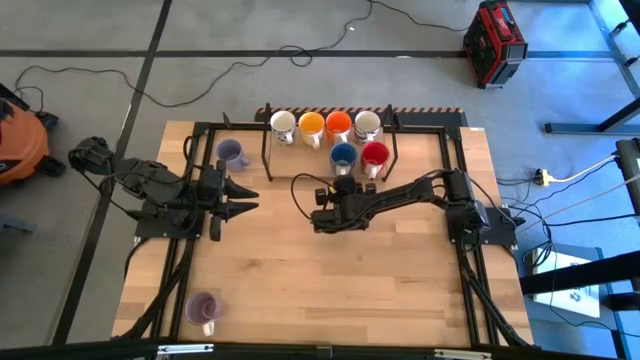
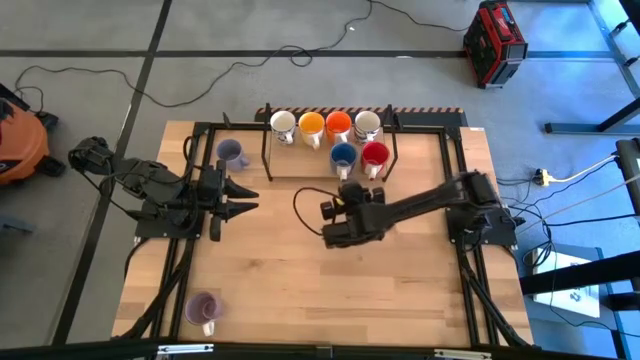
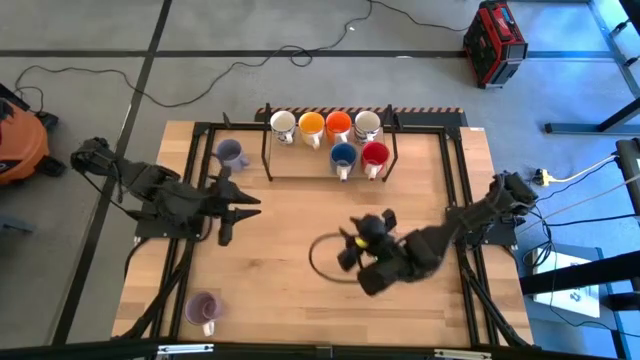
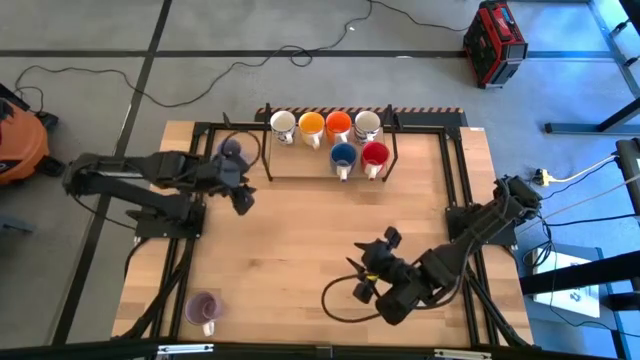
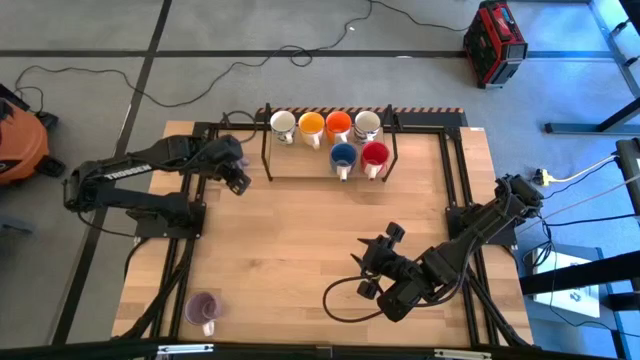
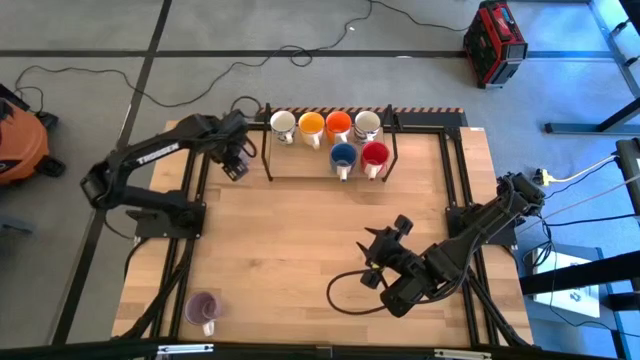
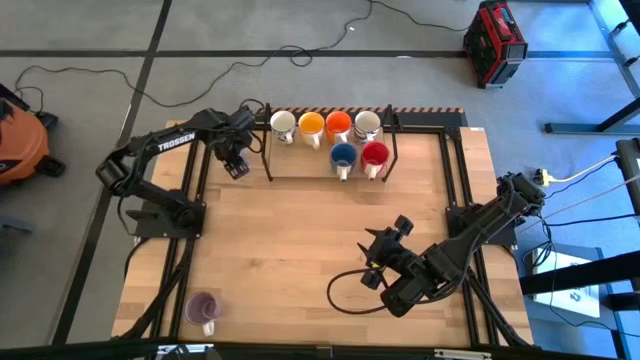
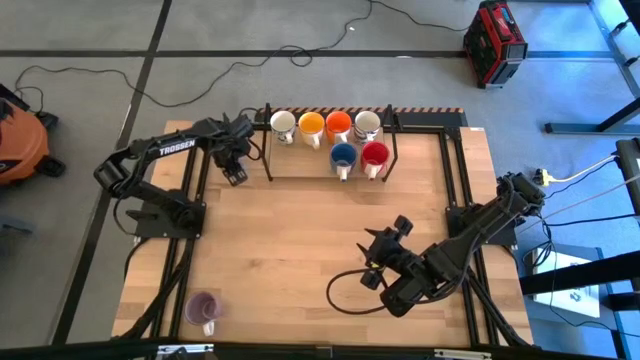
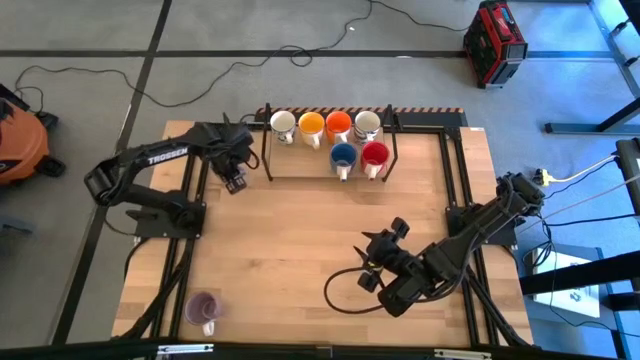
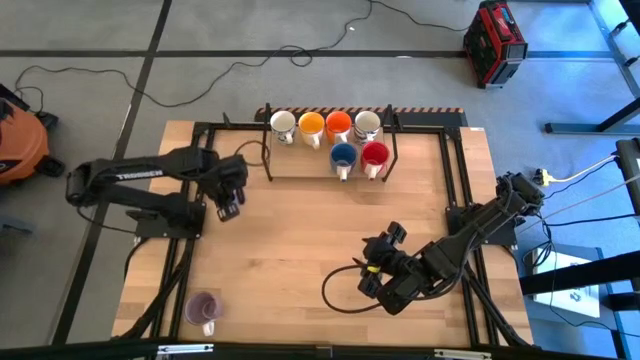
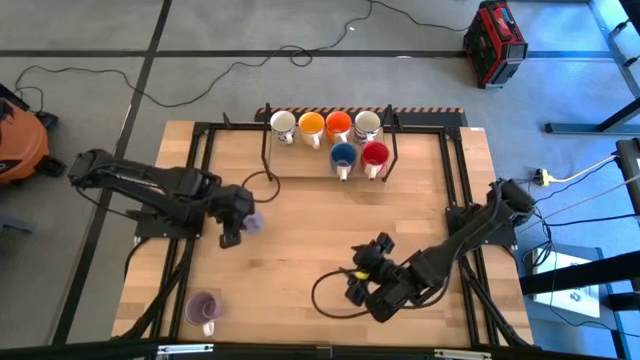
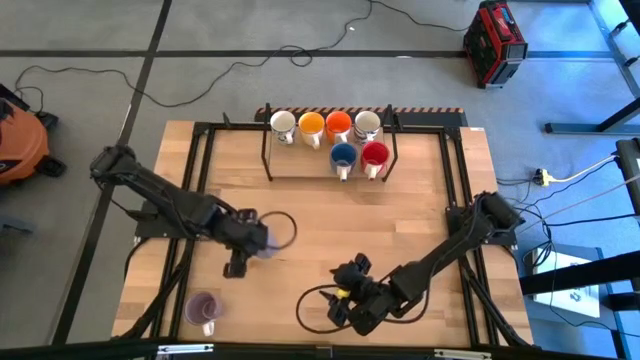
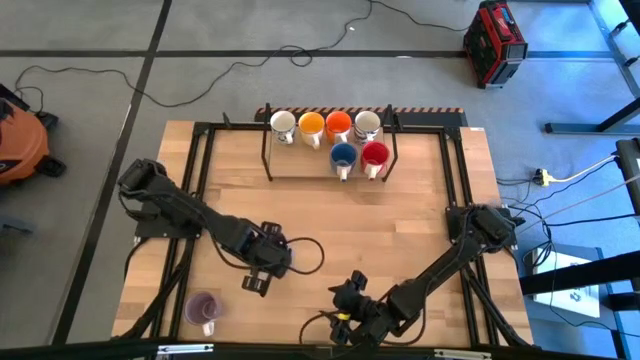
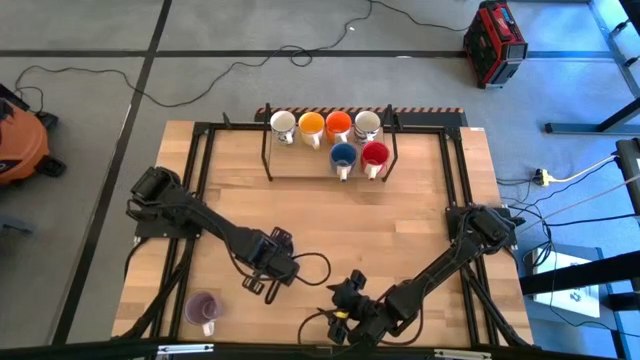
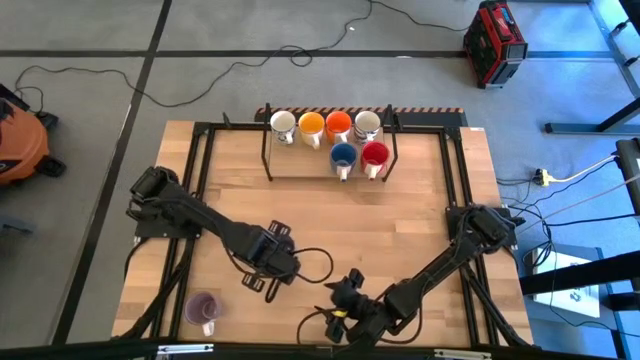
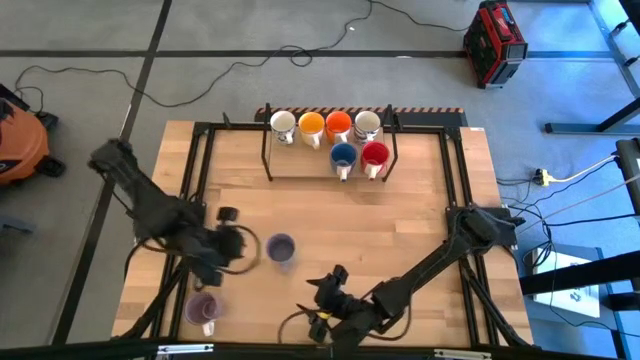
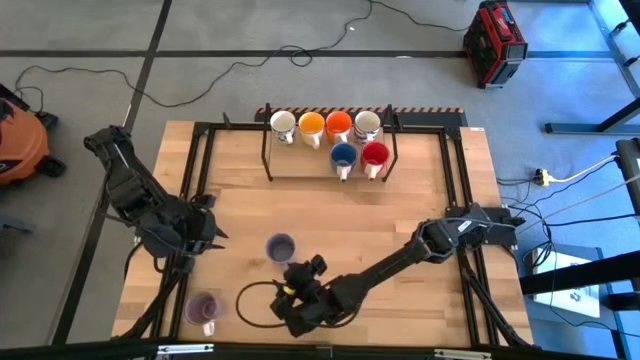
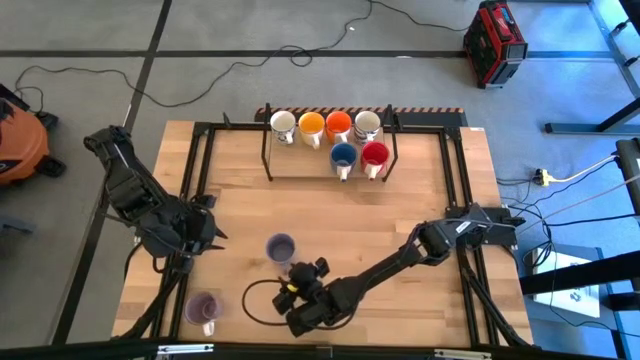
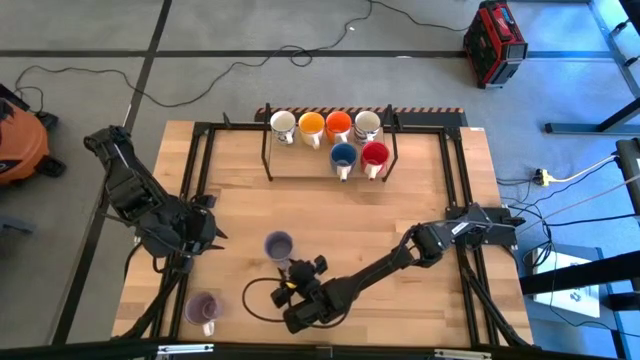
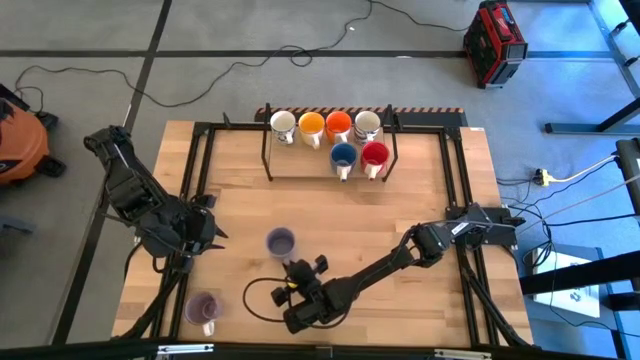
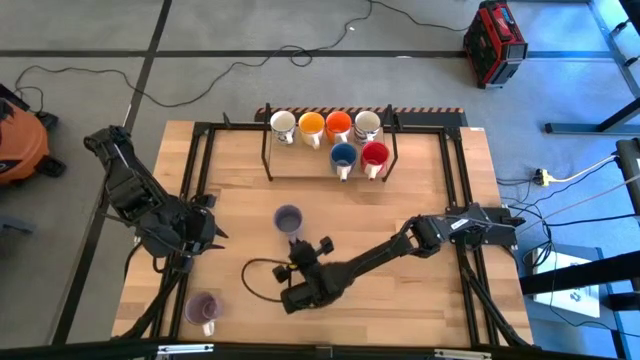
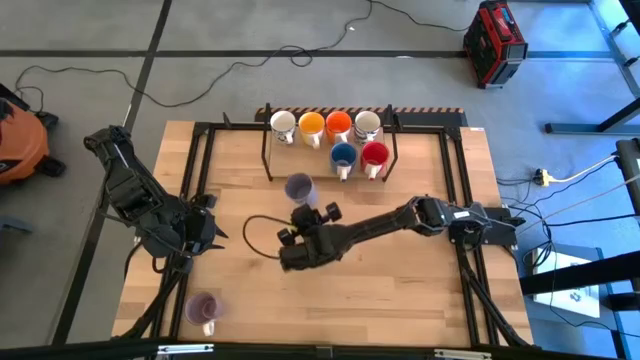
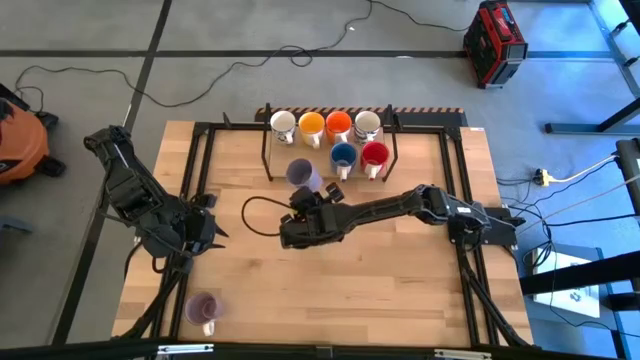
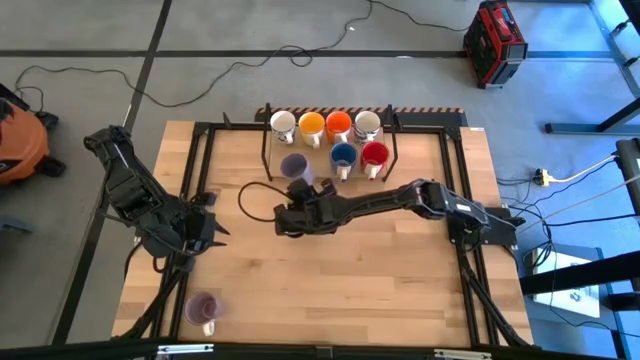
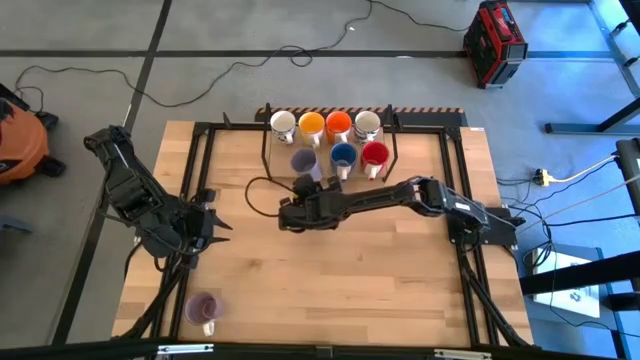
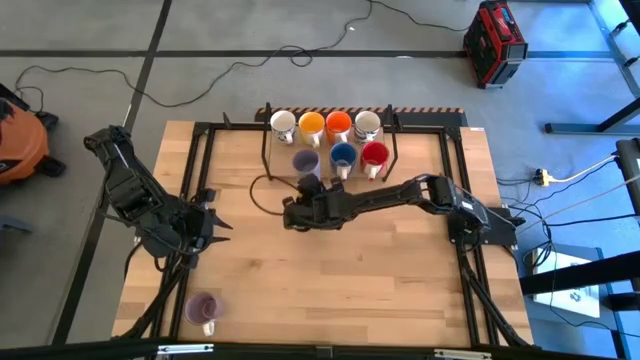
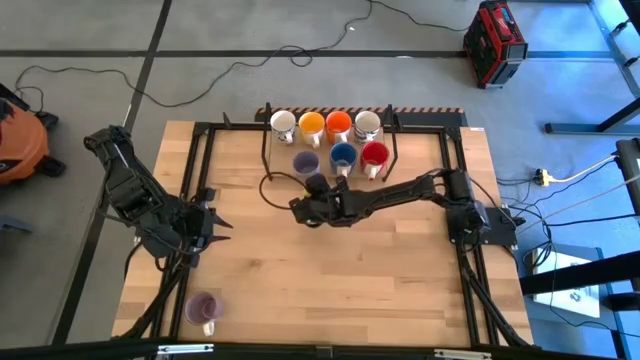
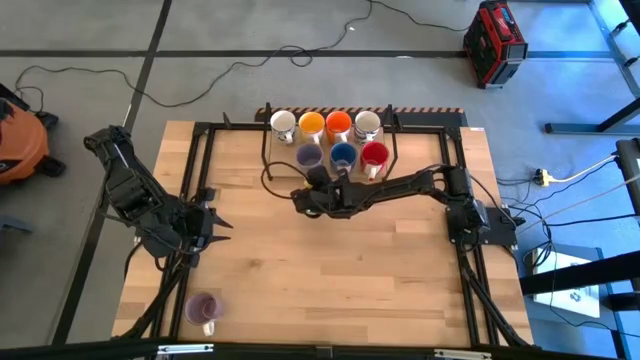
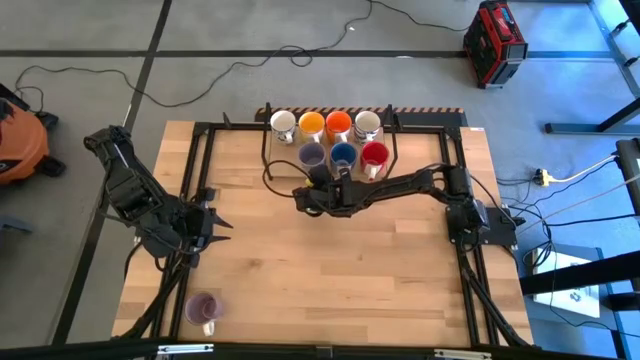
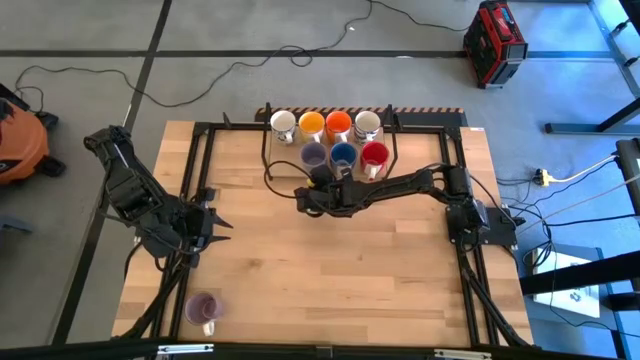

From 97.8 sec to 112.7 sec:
Task: Place coffee mugs
Put the light violet mug on the shelf
